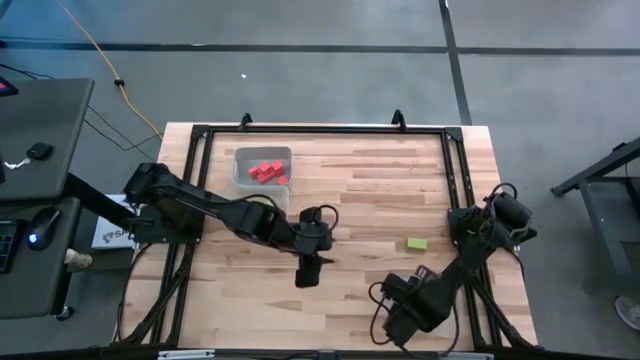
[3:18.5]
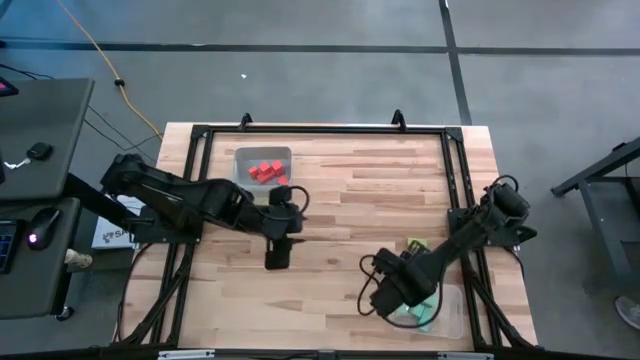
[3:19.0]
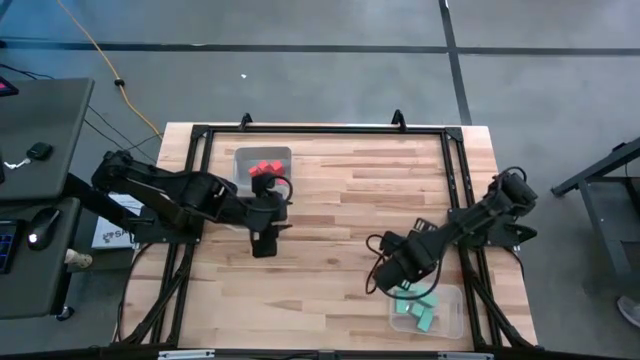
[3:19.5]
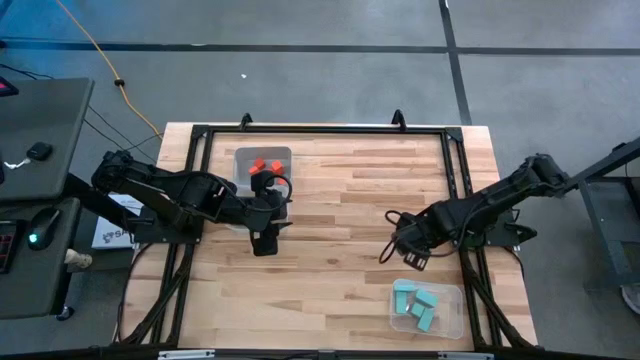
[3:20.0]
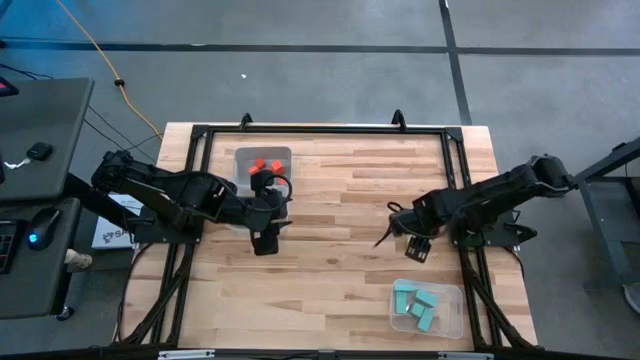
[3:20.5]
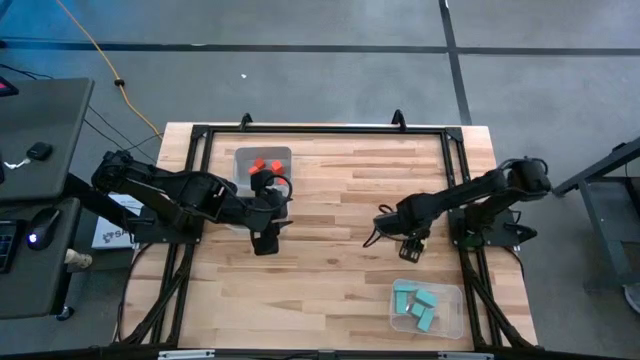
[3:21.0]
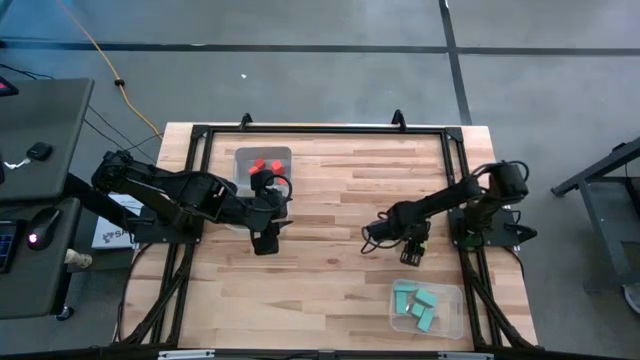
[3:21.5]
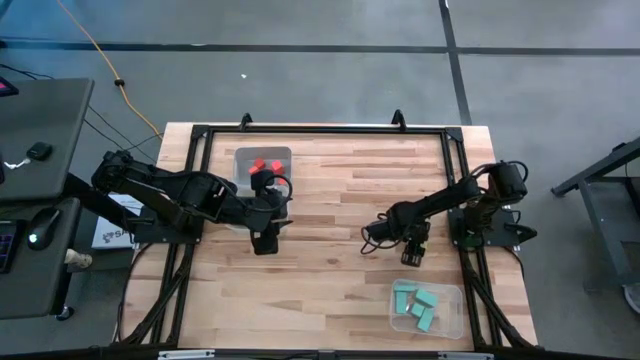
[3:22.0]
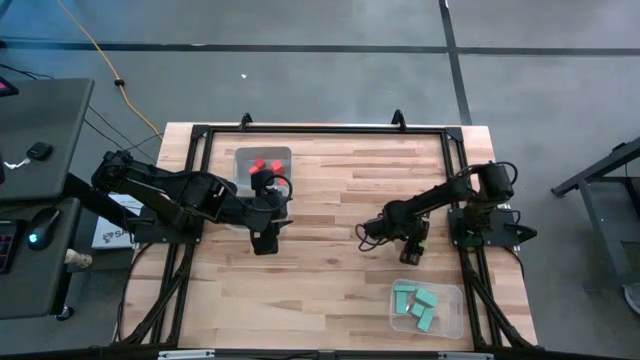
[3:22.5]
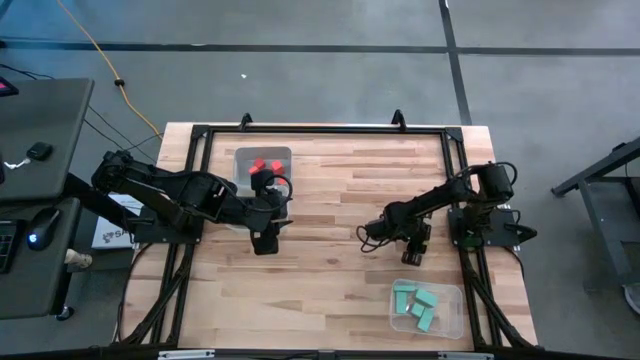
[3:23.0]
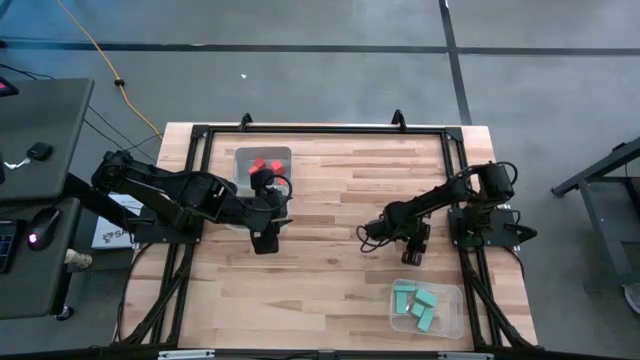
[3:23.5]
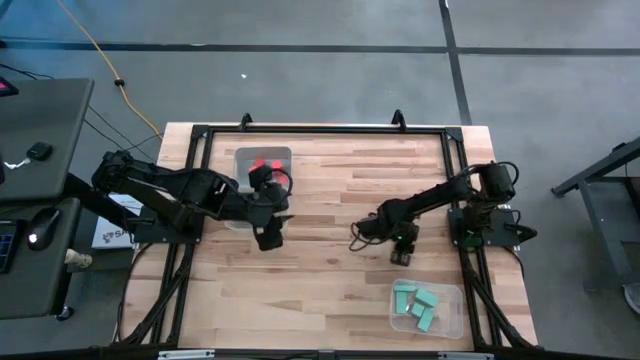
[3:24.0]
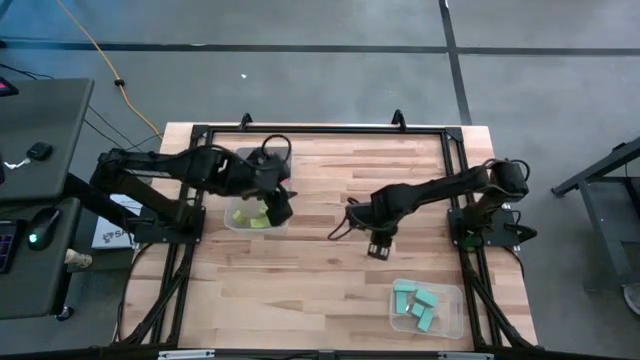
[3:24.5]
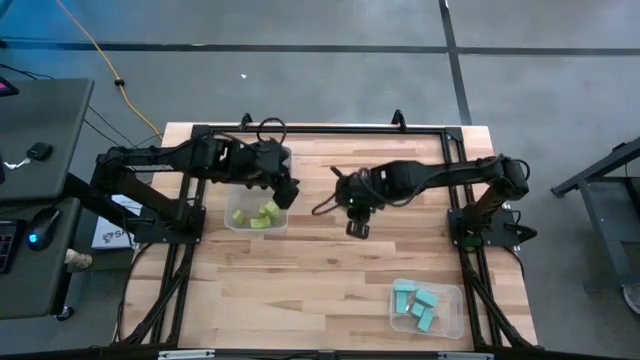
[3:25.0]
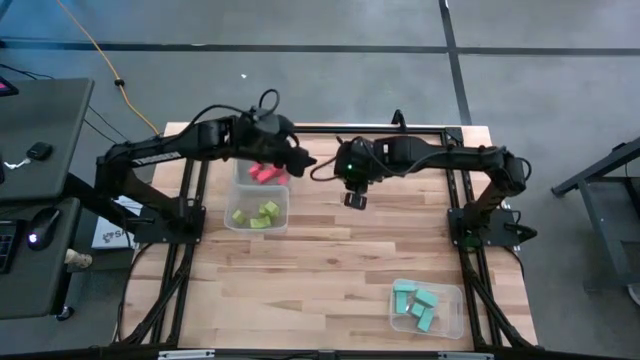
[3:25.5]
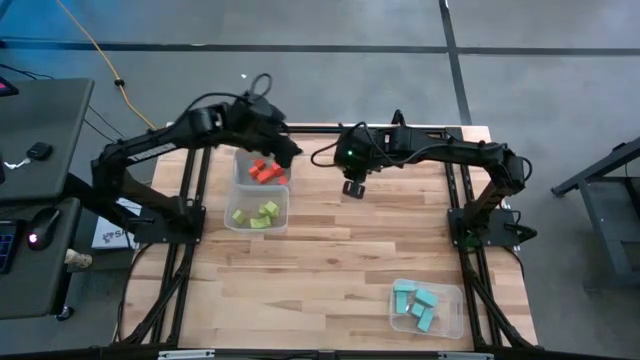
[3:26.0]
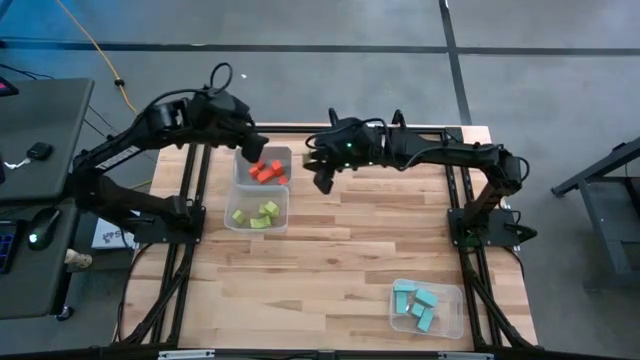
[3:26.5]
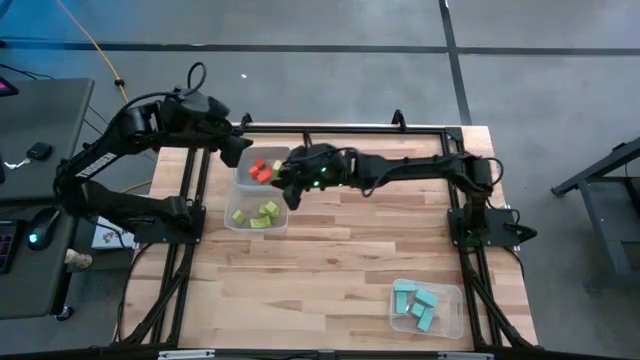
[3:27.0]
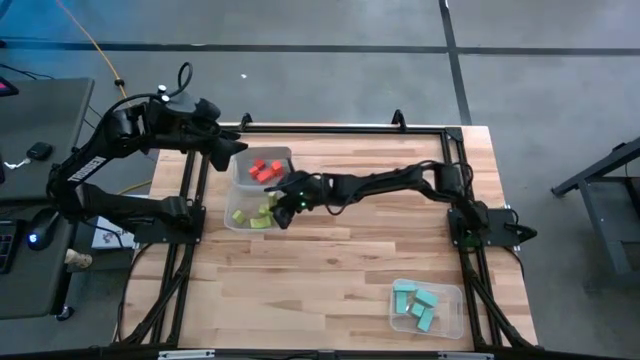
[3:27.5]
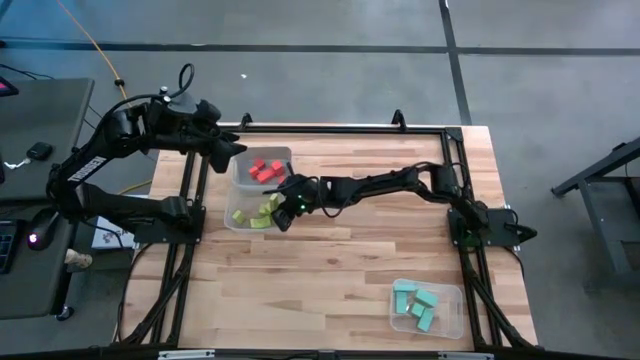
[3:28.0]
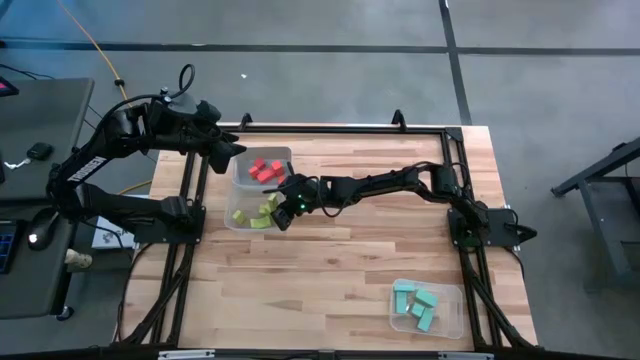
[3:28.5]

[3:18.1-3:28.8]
Task: Sort & place blocks by color
Put the green block into the top transparent bin

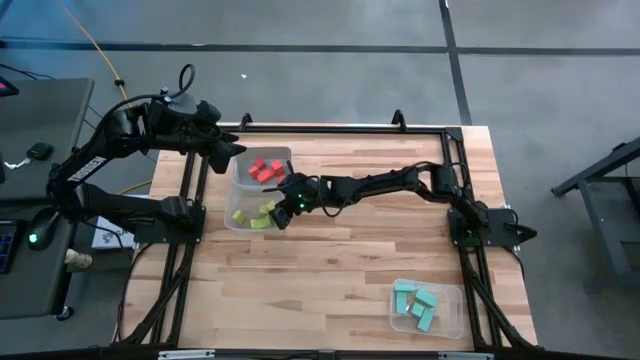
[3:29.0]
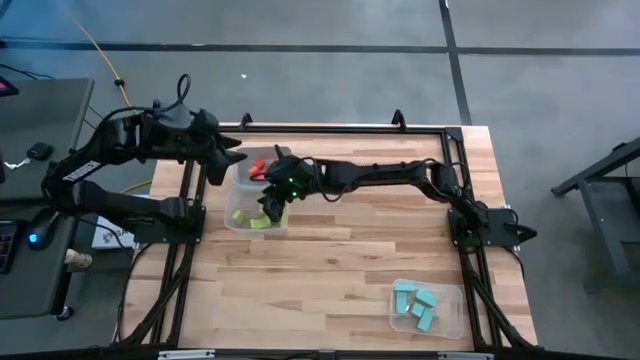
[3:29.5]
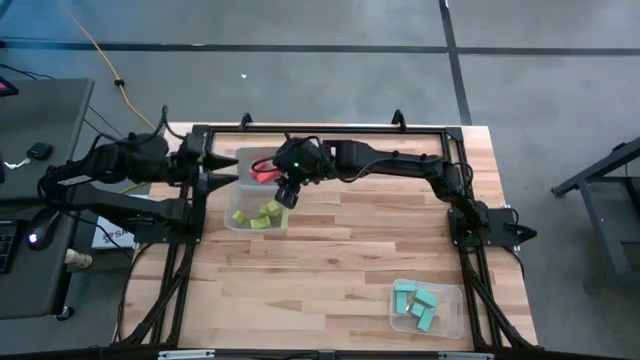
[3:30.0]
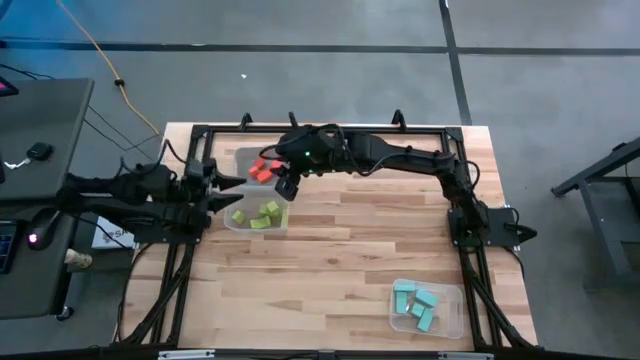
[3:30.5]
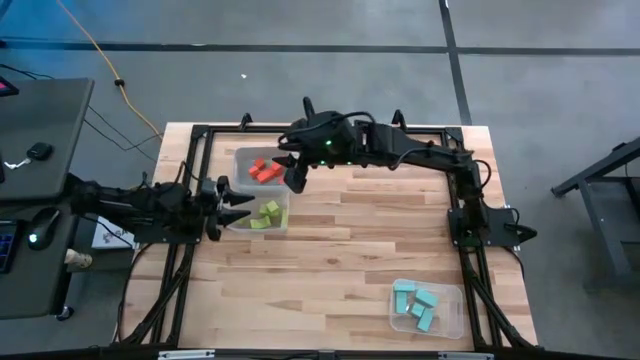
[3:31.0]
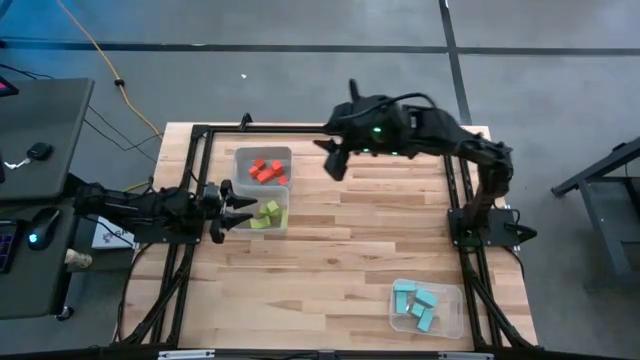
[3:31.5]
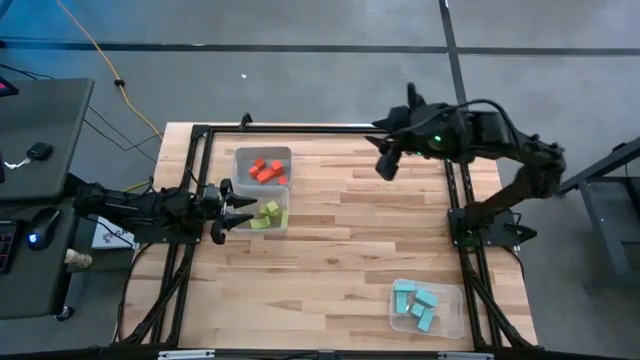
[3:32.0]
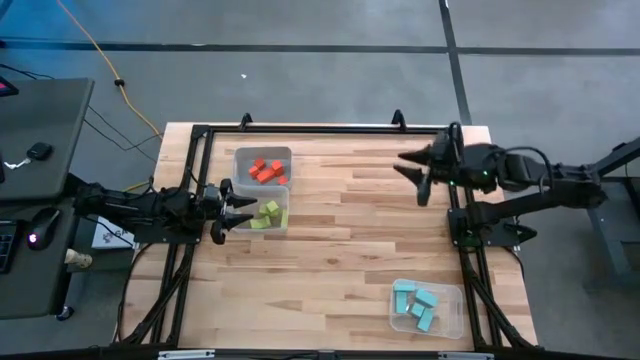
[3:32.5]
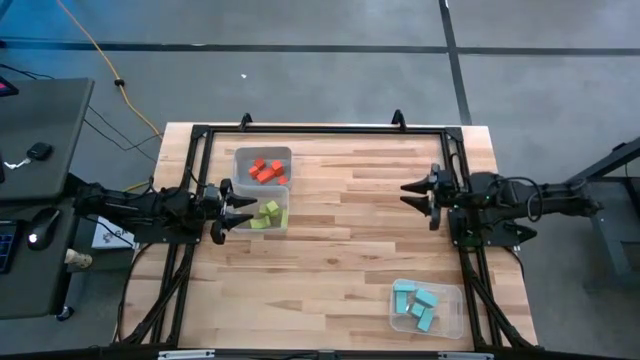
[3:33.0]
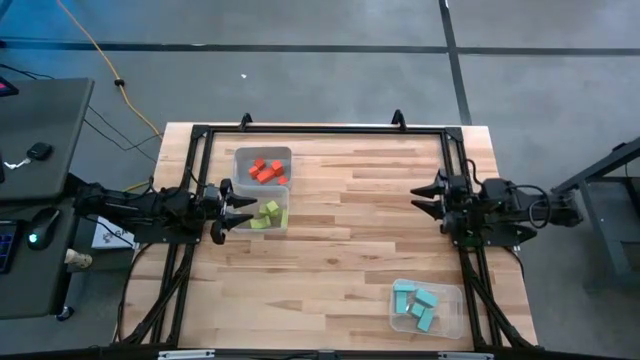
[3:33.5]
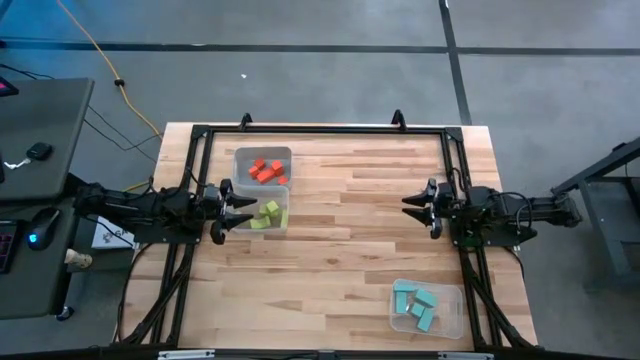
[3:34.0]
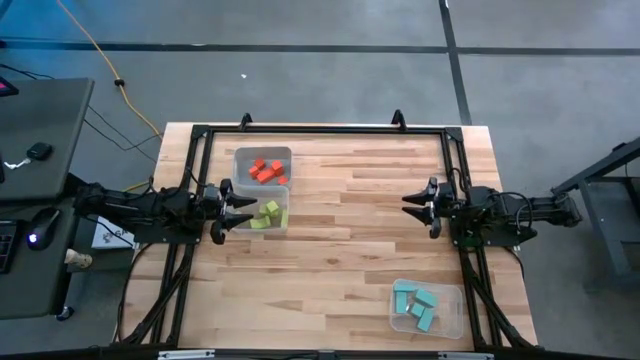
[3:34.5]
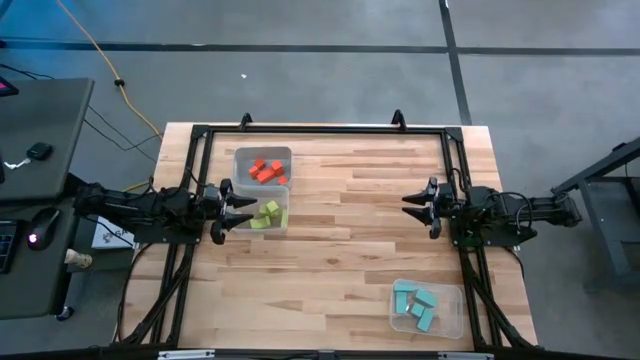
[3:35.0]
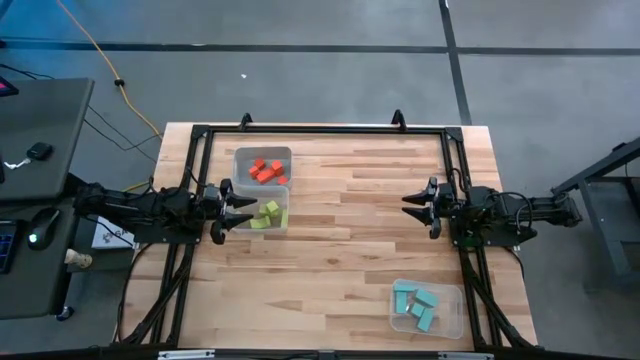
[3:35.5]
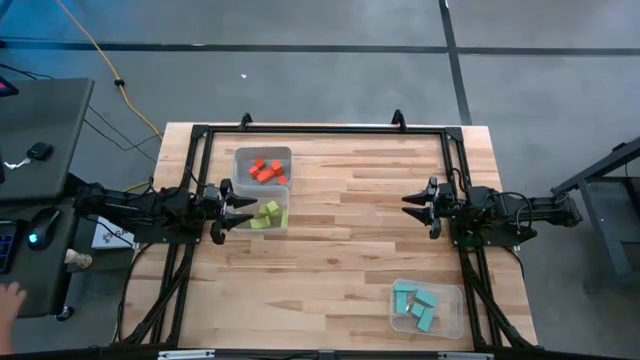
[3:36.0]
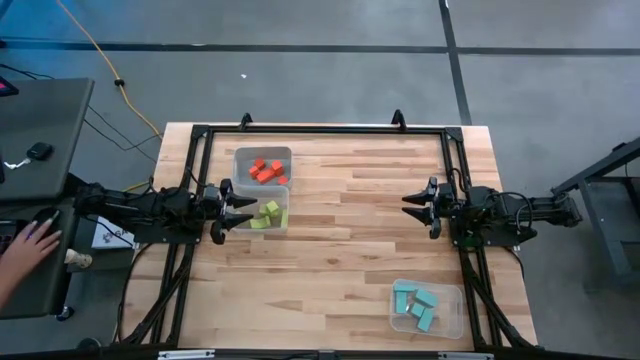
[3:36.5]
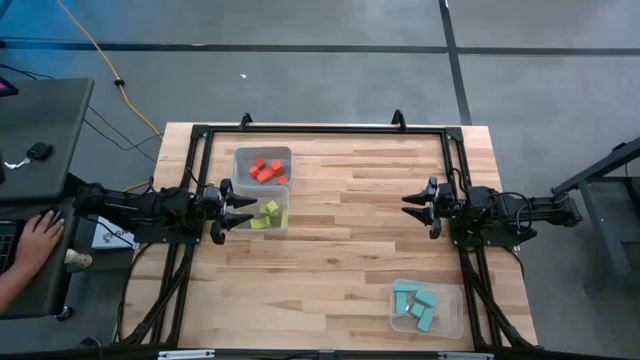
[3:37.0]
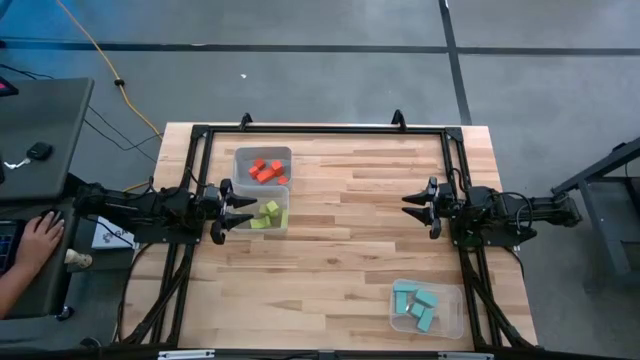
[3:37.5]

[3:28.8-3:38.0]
Return to Home Position

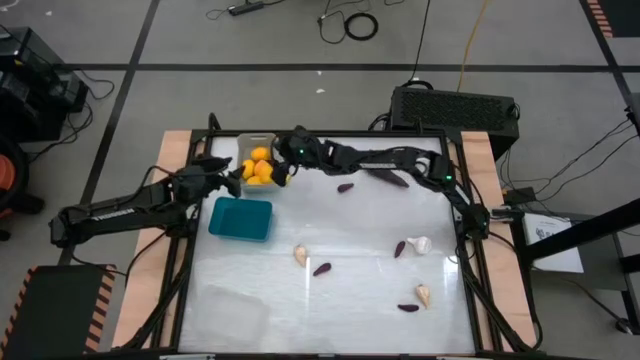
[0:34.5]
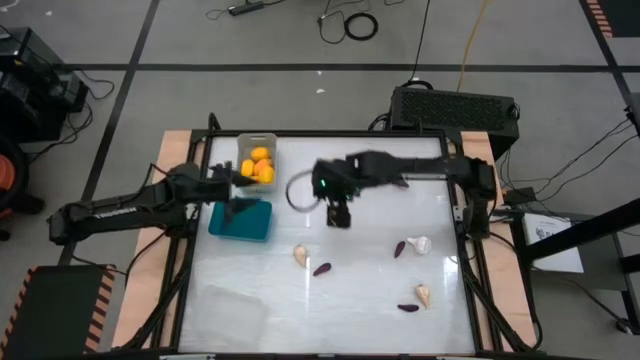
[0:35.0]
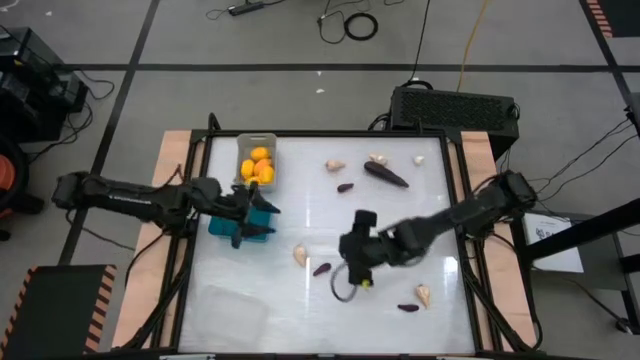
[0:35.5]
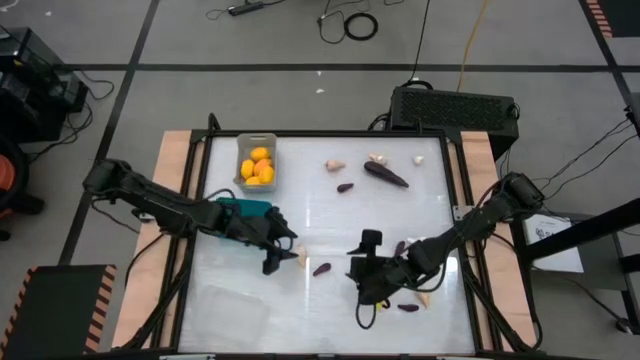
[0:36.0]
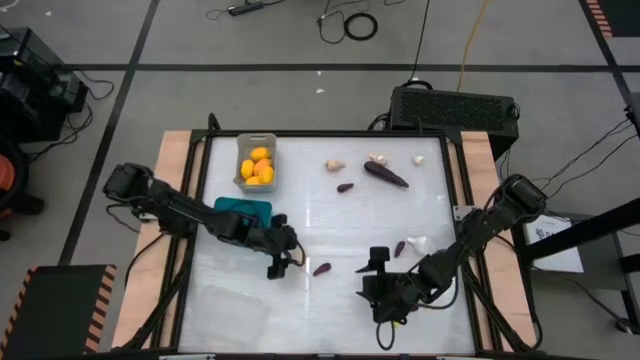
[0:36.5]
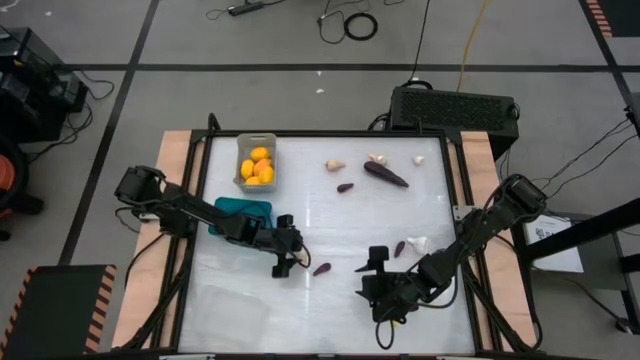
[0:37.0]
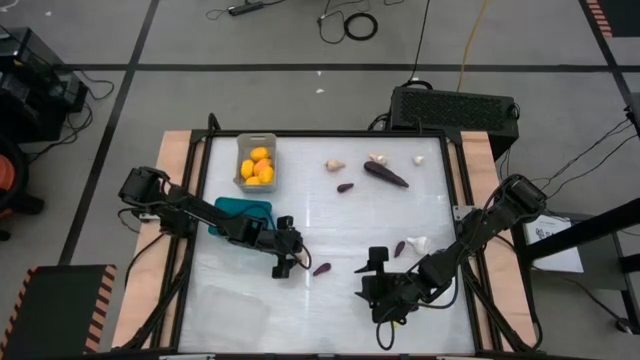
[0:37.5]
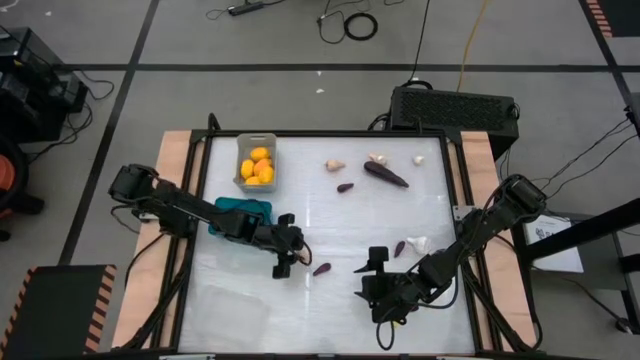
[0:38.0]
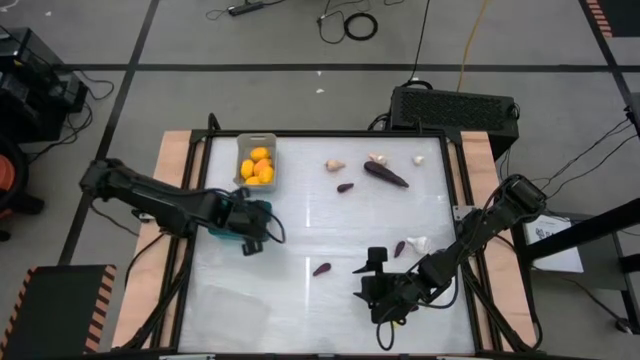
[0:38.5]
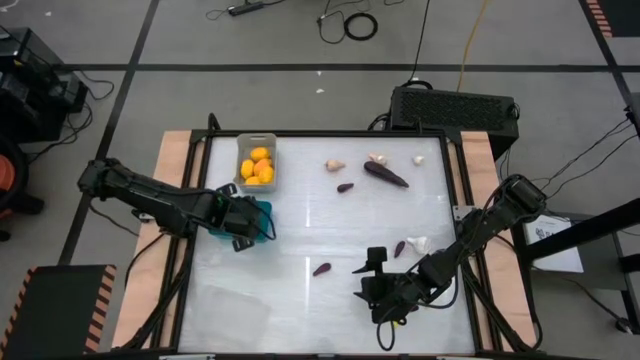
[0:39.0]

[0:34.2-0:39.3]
Task: Sort produce into baskets
Put the white garlic into the blue bin
